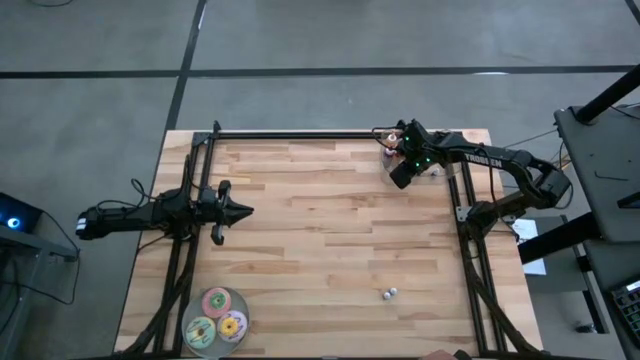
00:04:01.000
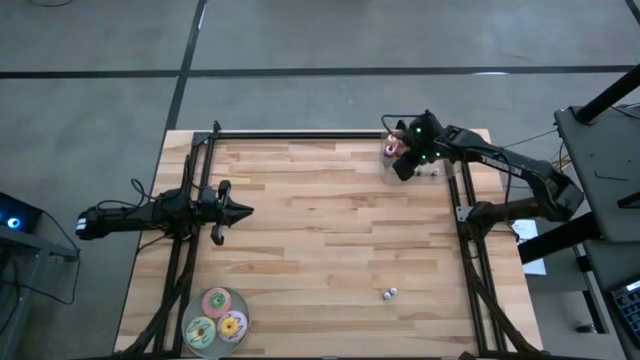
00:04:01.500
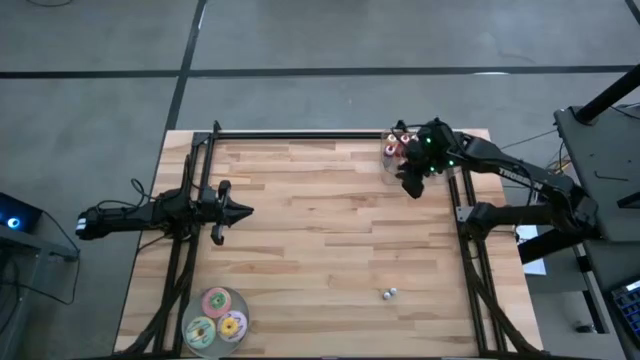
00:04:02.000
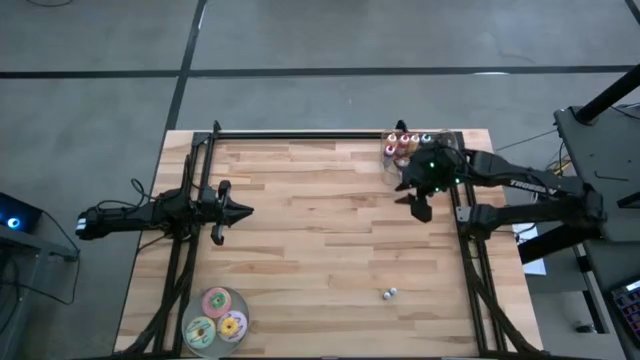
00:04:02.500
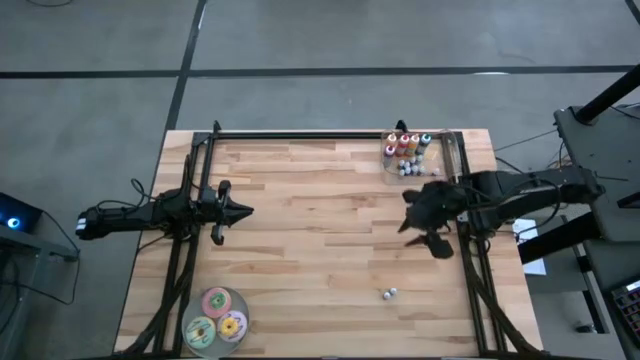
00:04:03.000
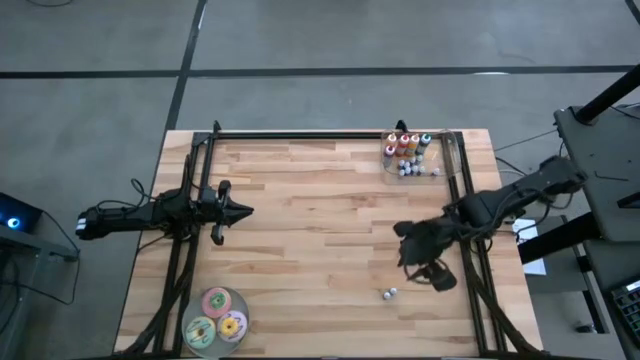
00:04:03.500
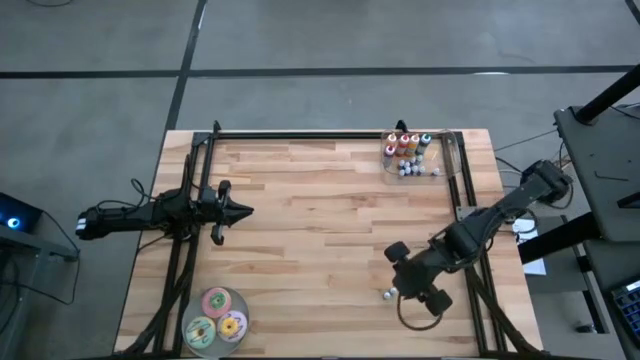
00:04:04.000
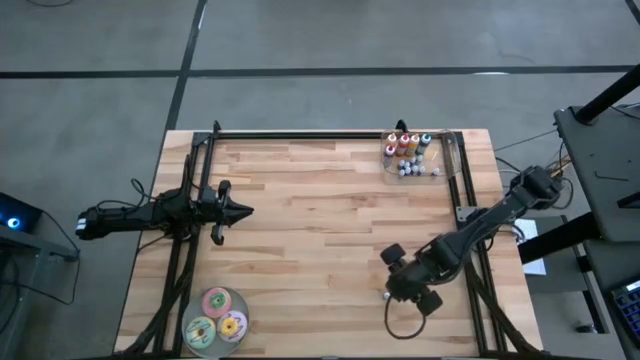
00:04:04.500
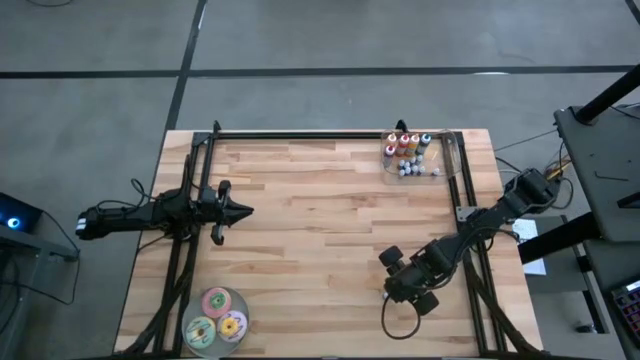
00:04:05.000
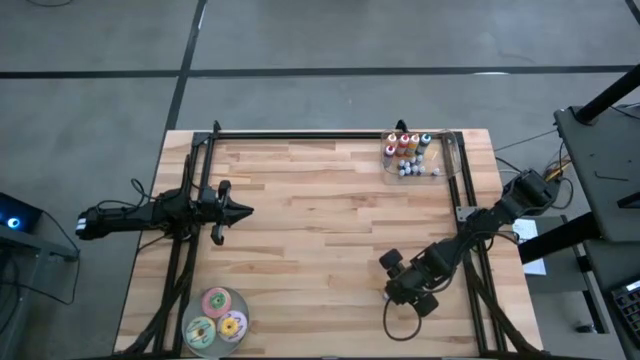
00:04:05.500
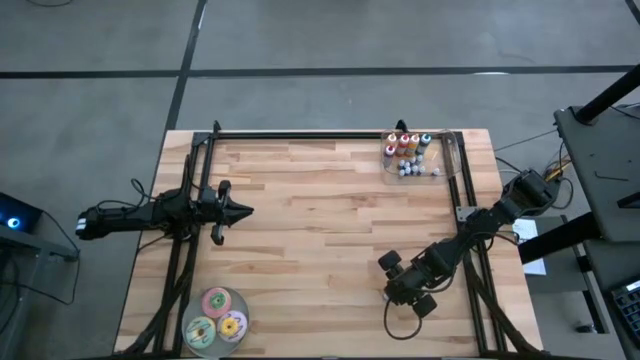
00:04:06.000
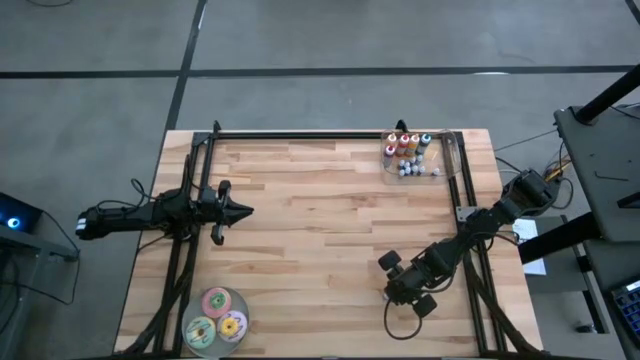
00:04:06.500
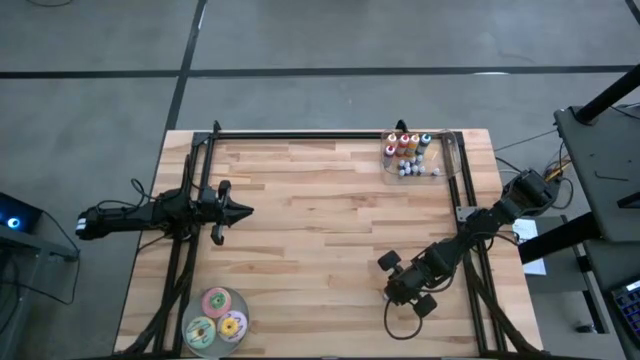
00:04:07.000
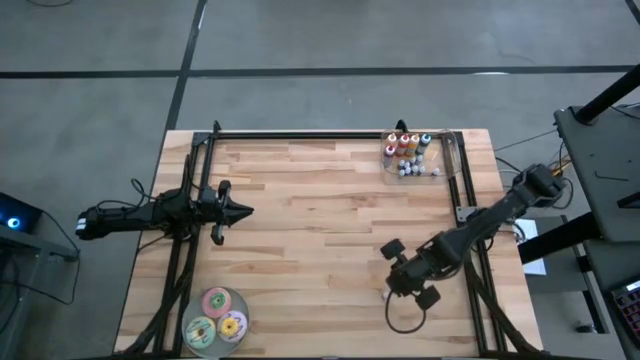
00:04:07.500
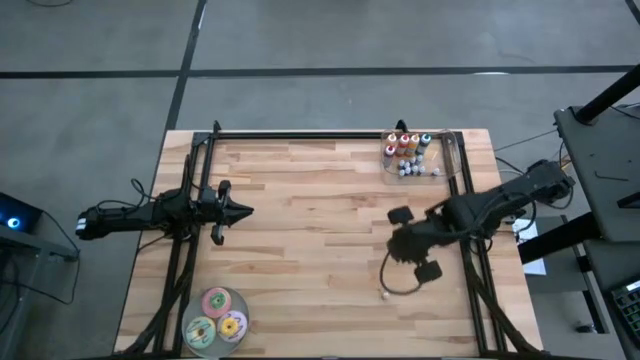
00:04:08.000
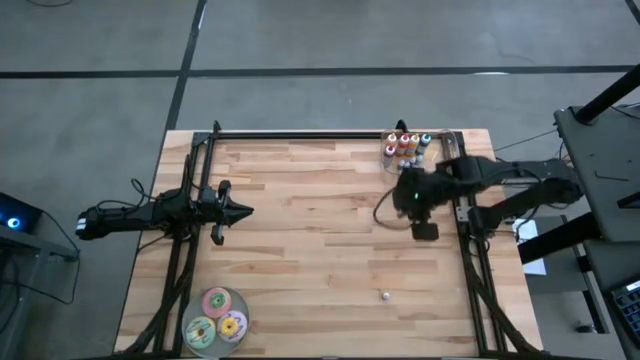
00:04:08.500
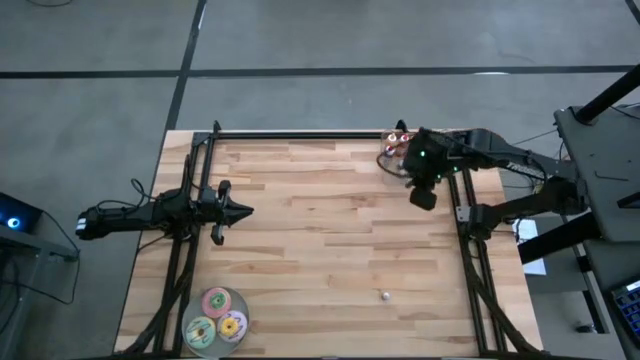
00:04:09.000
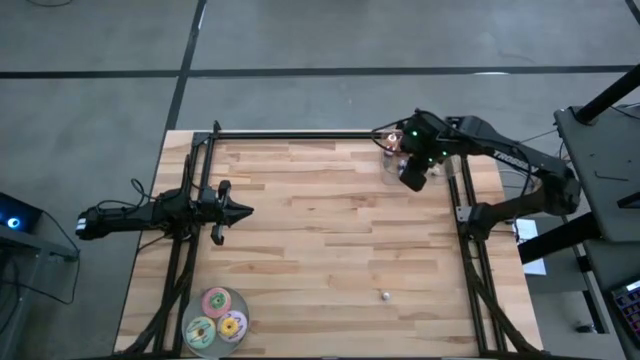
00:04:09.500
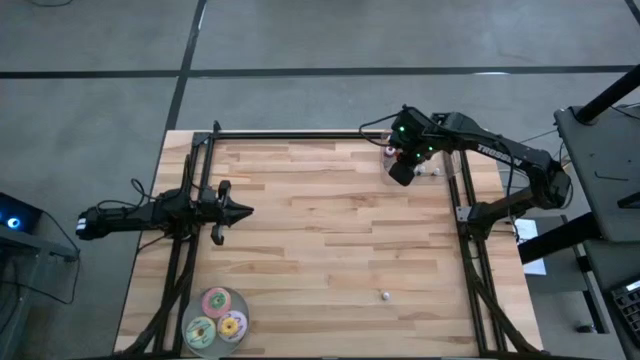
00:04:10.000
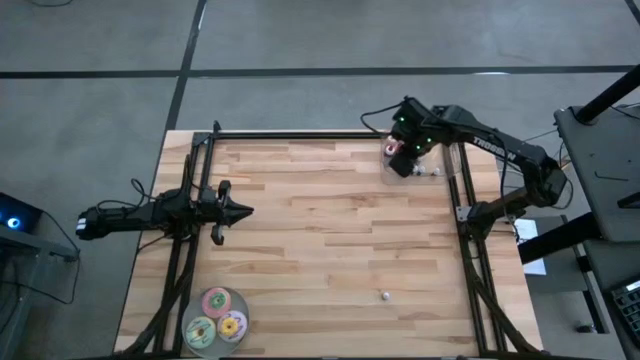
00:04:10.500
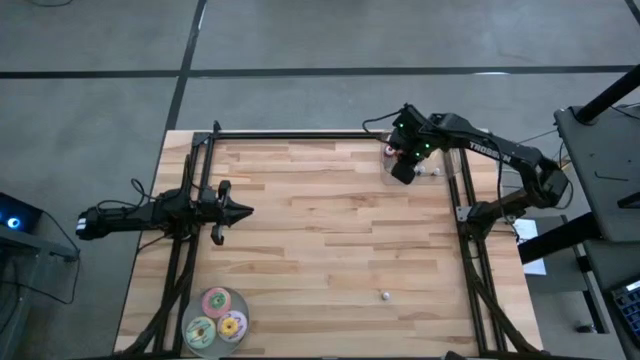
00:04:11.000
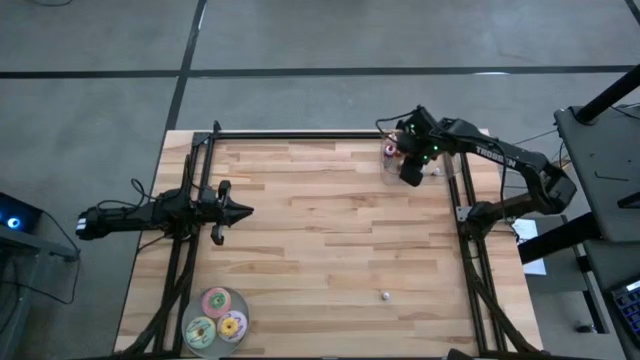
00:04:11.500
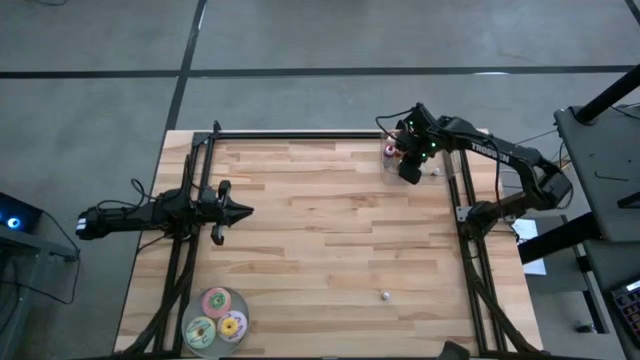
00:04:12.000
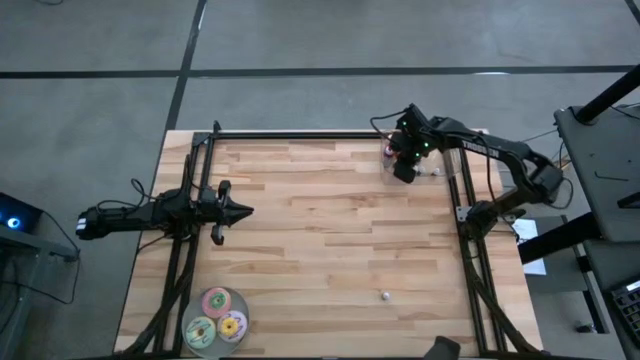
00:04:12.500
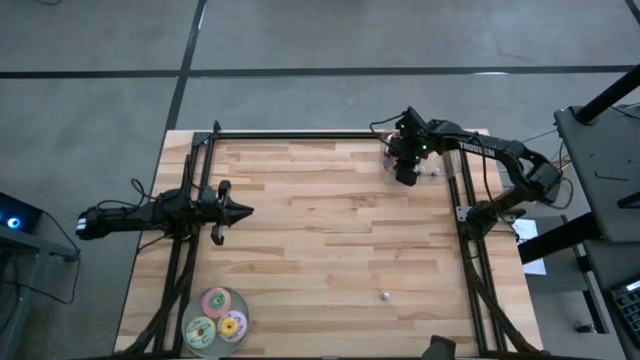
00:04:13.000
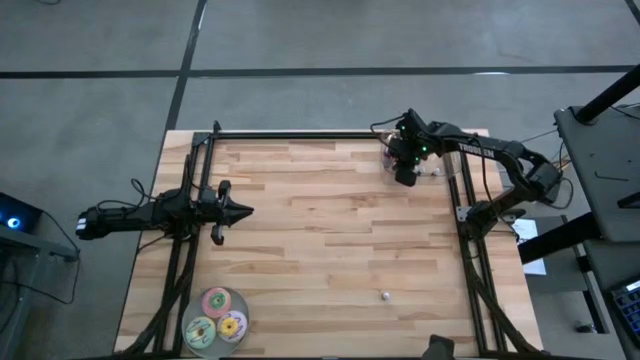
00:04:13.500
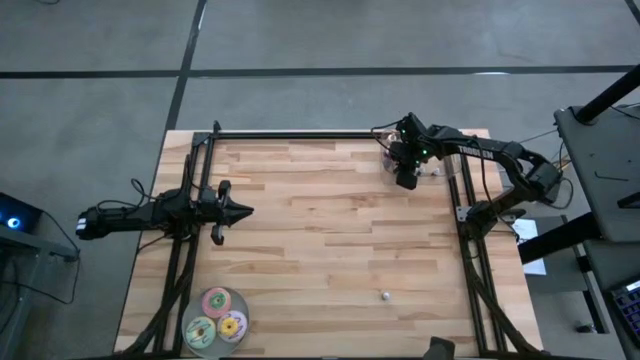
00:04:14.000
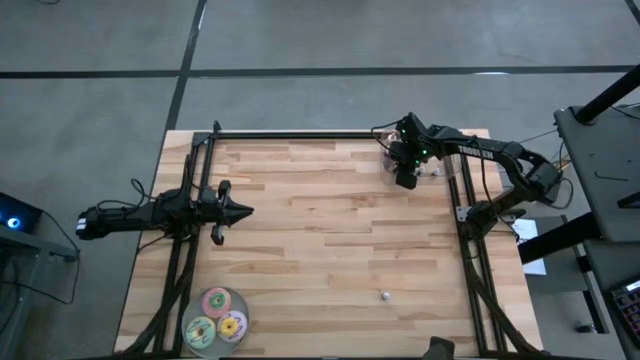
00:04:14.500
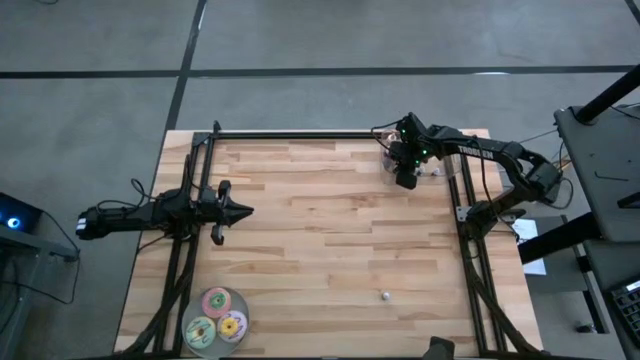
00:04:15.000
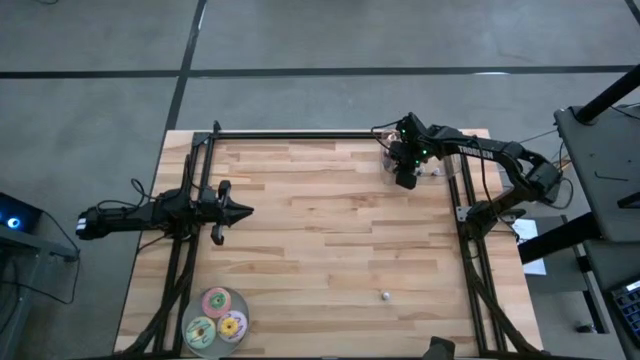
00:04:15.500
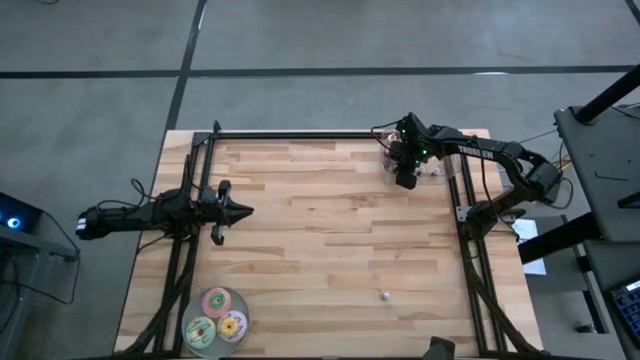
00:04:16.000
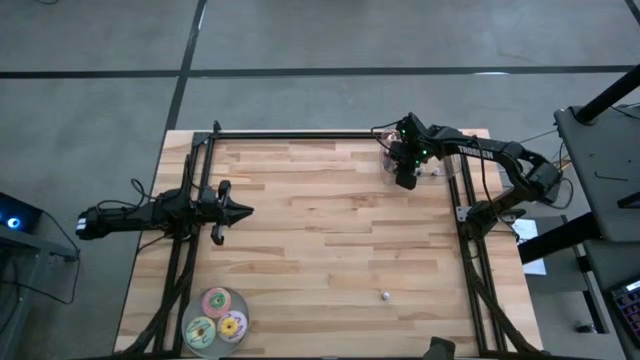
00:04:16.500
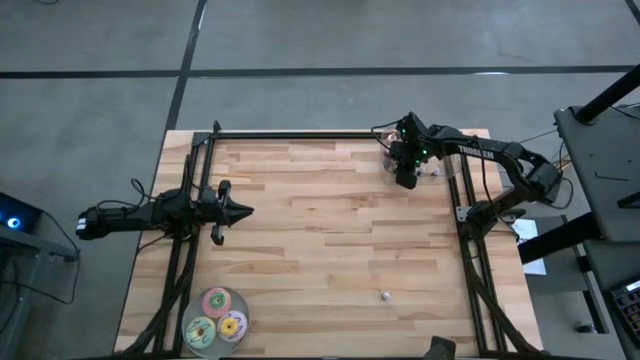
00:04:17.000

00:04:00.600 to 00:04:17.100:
Task: Pick & Place food coloring
Put the small blue food coloring bottle into the bin

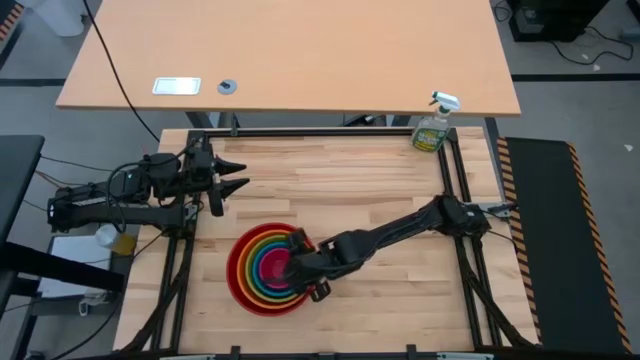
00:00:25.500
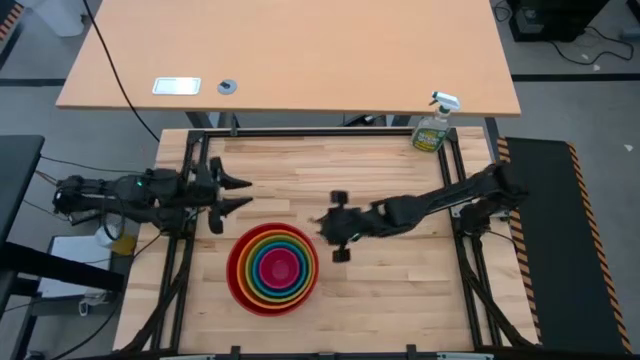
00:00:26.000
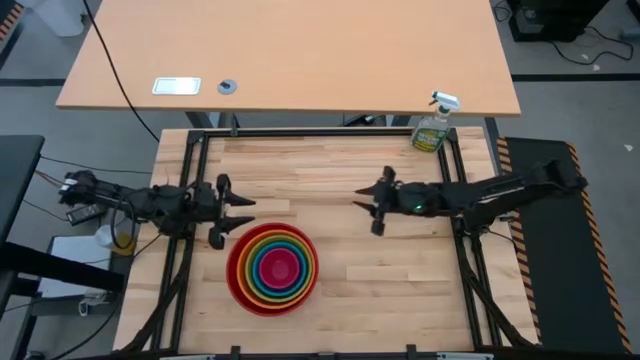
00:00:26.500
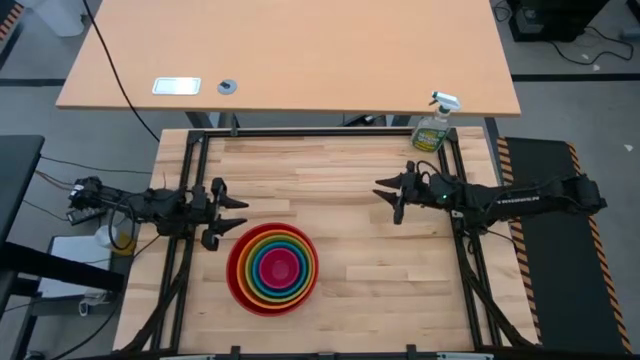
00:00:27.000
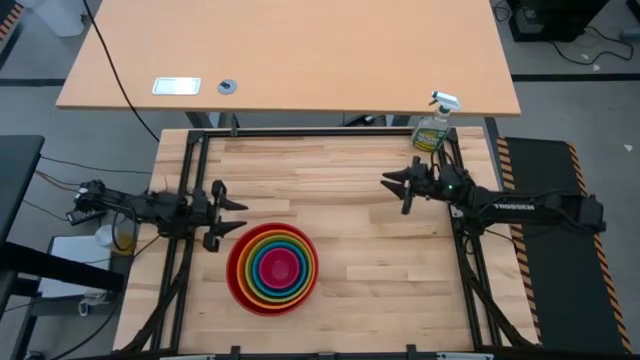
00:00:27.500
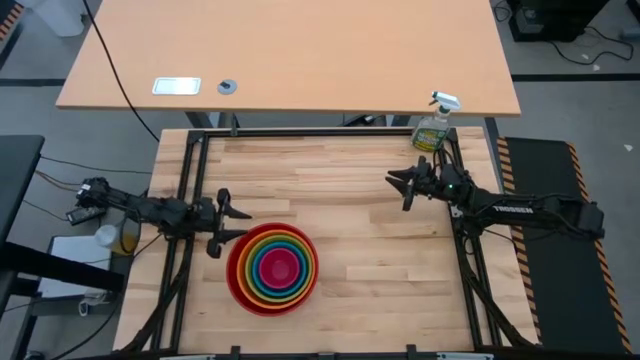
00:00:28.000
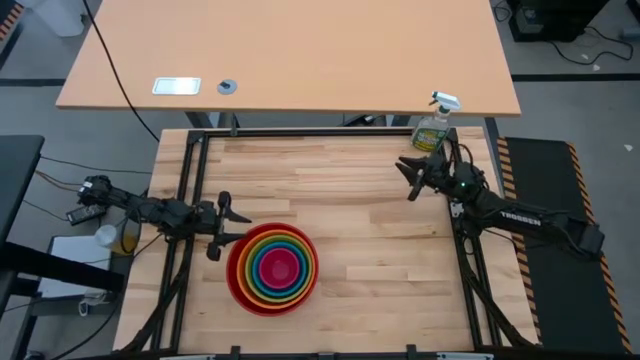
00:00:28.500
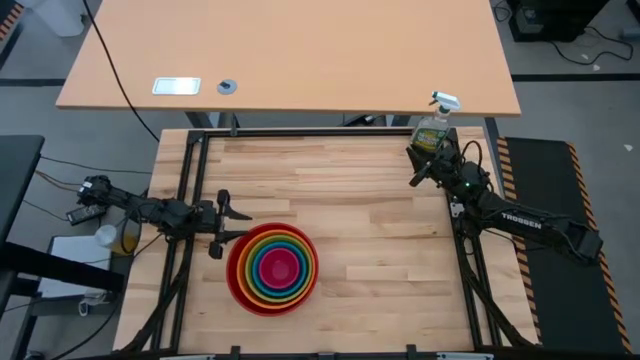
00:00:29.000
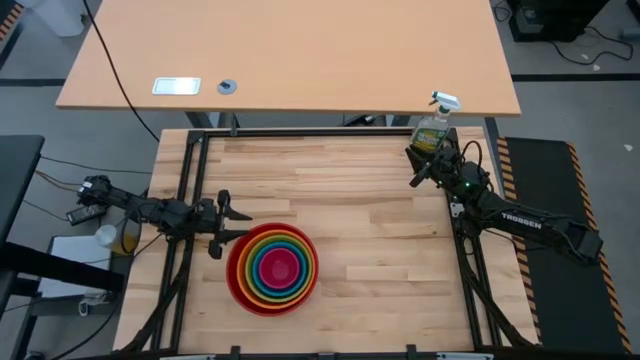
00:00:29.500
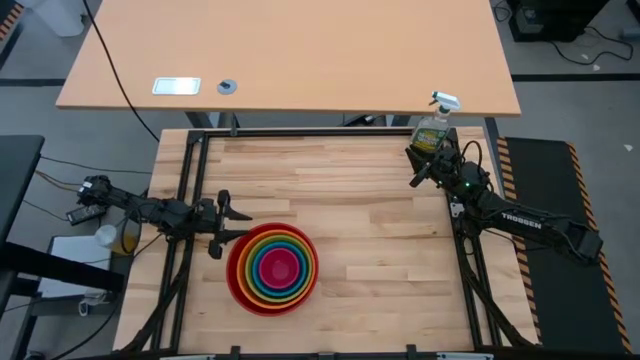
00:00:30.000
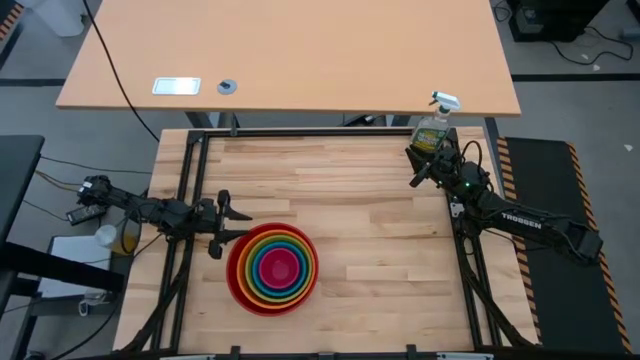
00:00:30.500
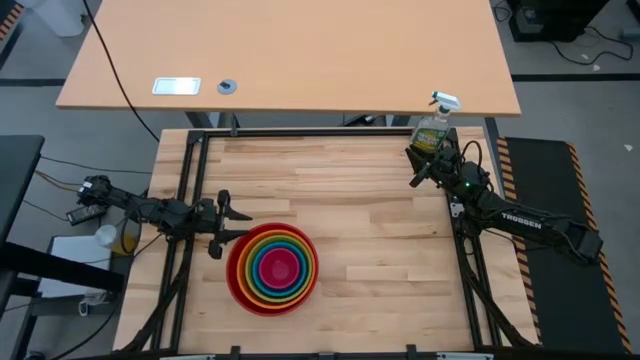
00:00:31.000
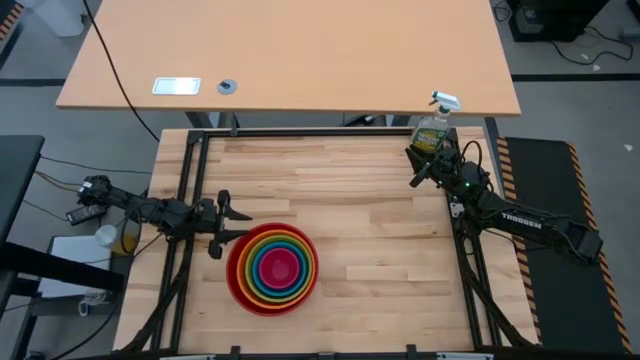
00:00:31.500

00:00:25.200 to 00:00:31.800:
Task: Nest bowls inside each other by size order
Return to Home Position
